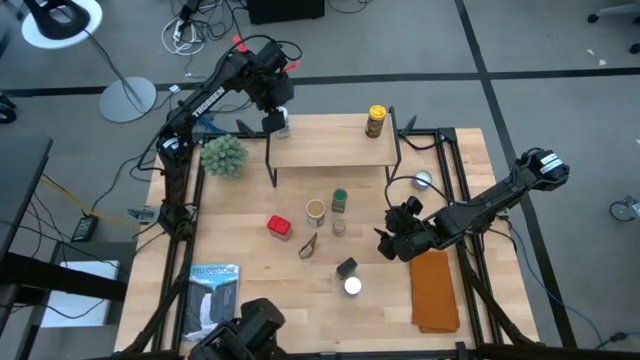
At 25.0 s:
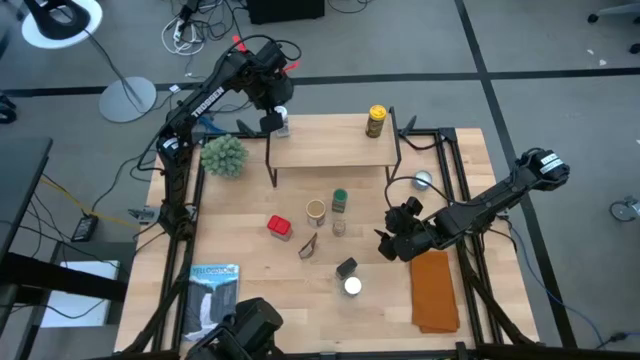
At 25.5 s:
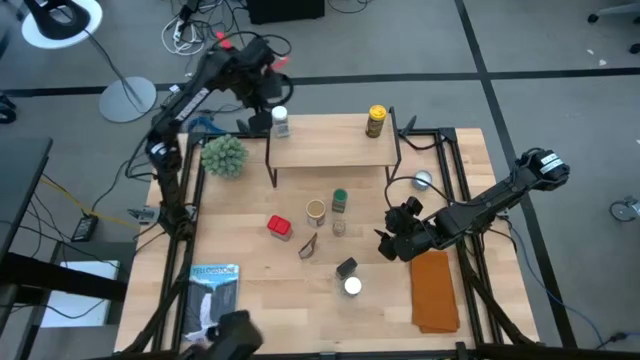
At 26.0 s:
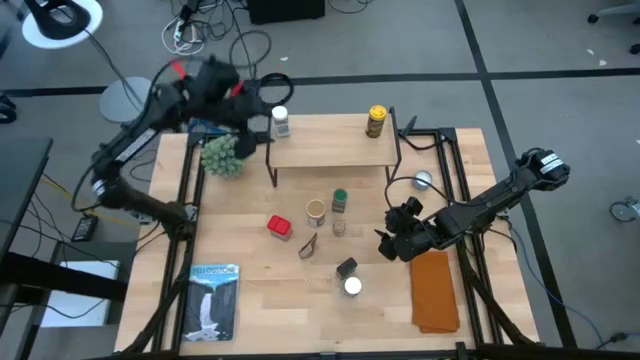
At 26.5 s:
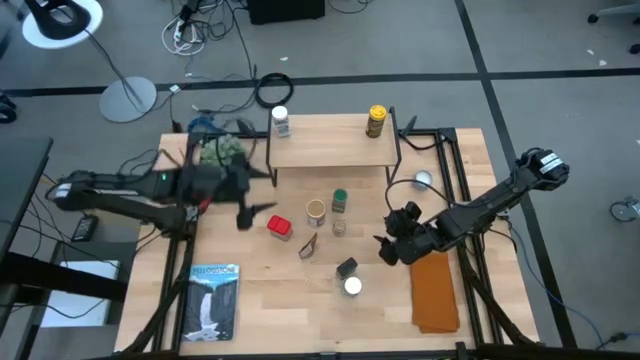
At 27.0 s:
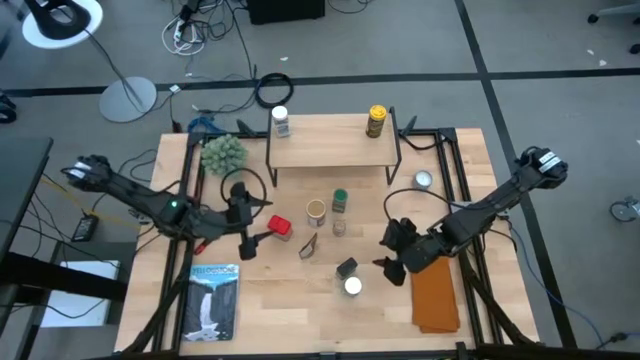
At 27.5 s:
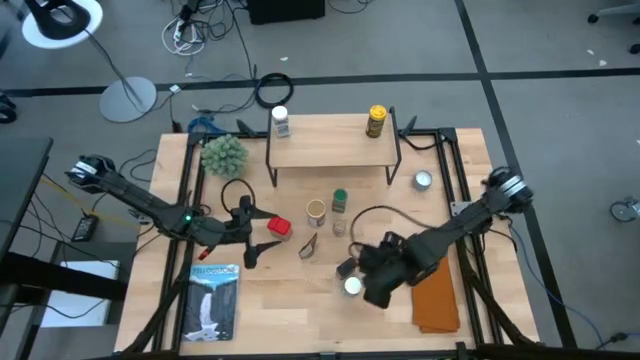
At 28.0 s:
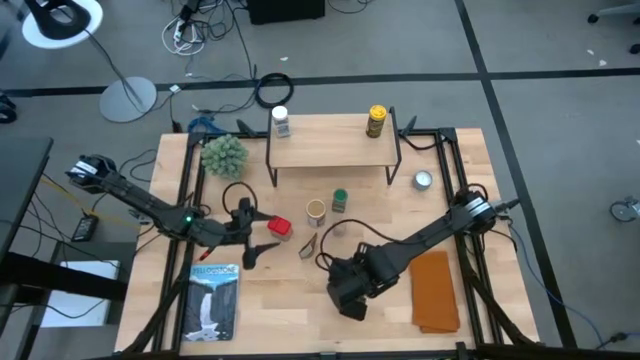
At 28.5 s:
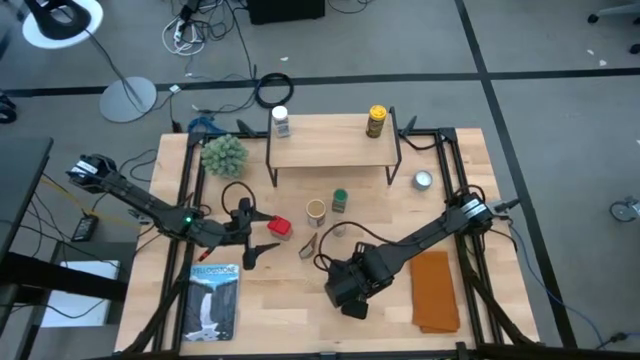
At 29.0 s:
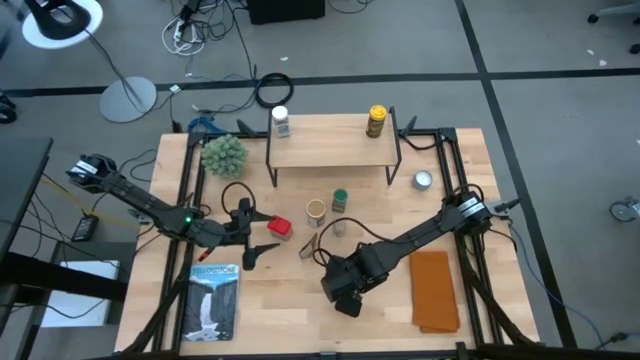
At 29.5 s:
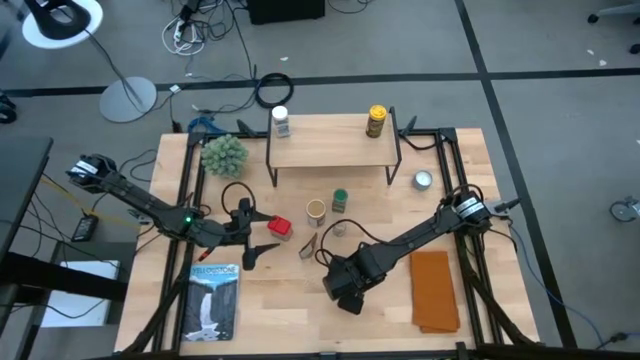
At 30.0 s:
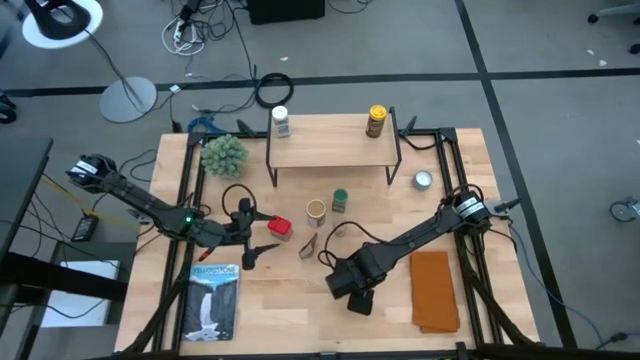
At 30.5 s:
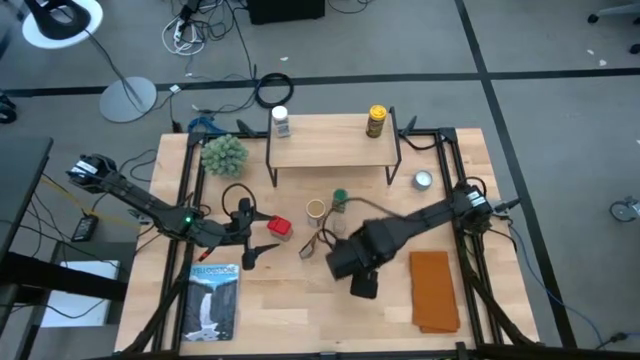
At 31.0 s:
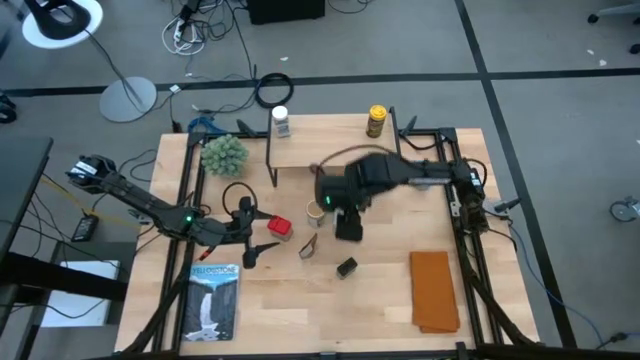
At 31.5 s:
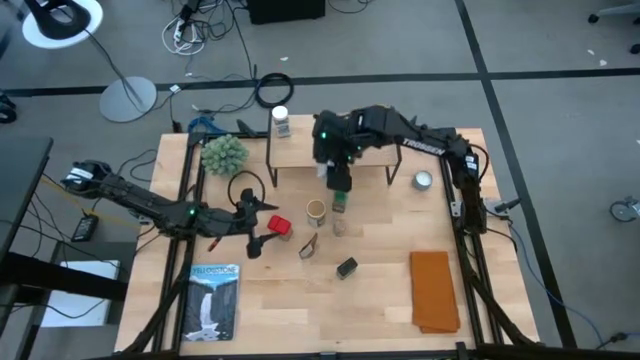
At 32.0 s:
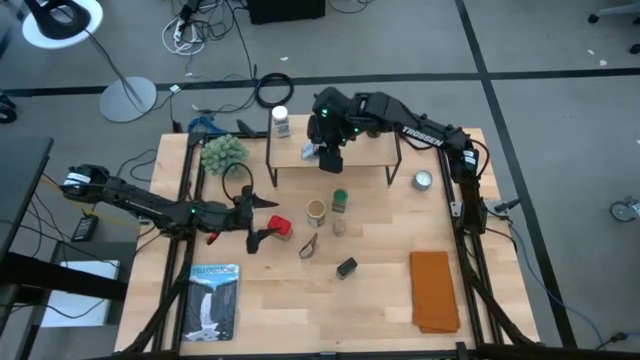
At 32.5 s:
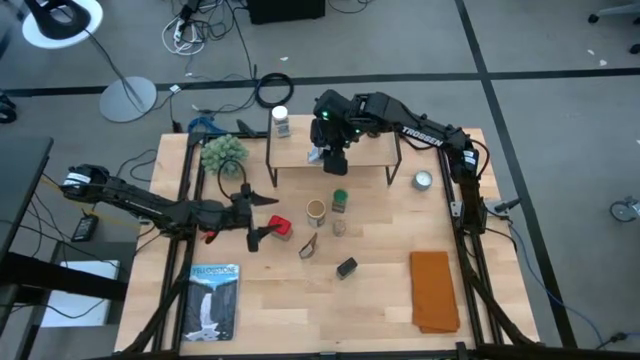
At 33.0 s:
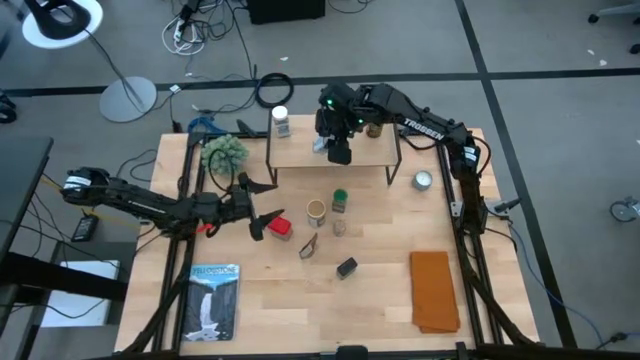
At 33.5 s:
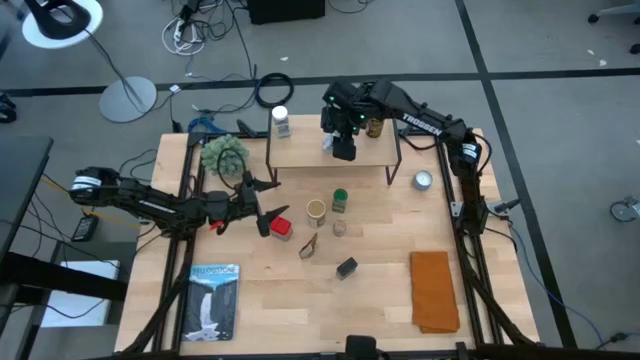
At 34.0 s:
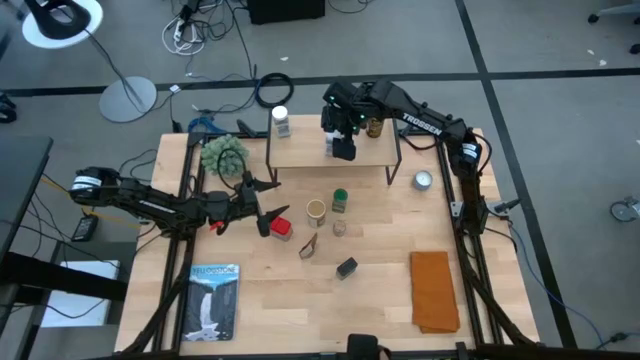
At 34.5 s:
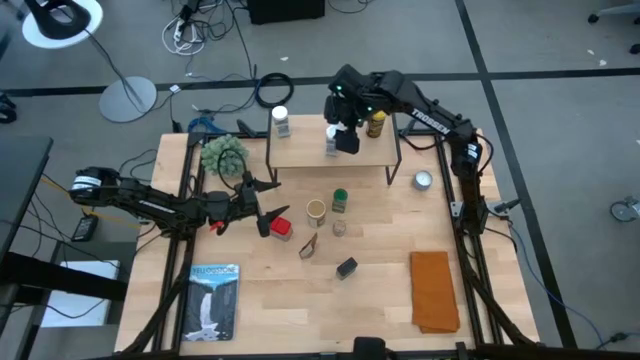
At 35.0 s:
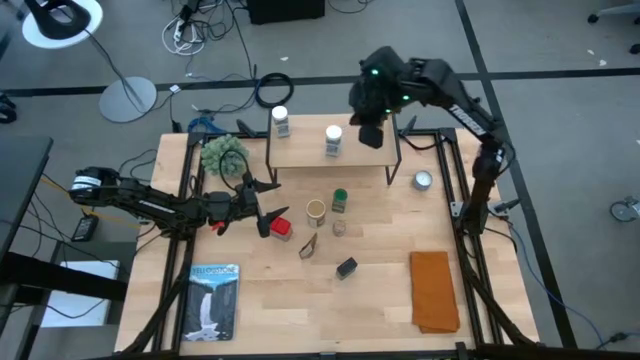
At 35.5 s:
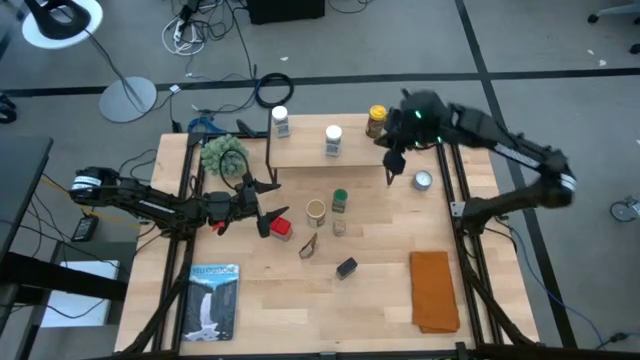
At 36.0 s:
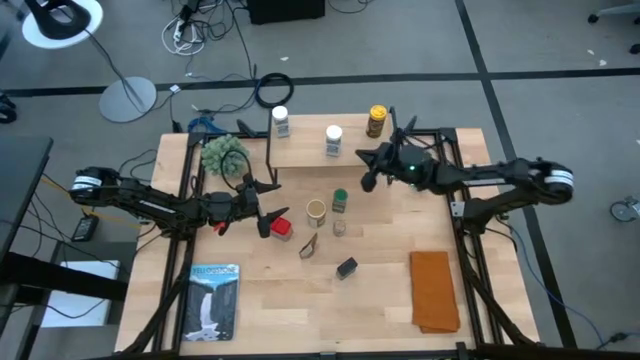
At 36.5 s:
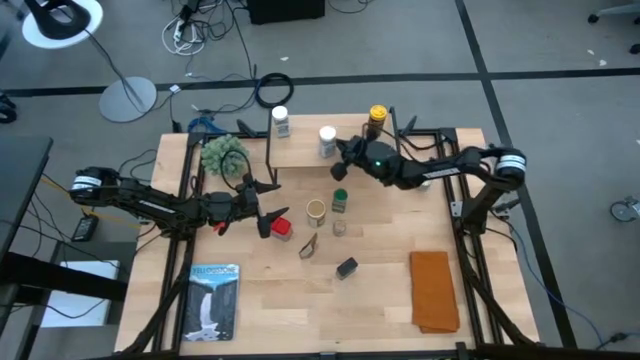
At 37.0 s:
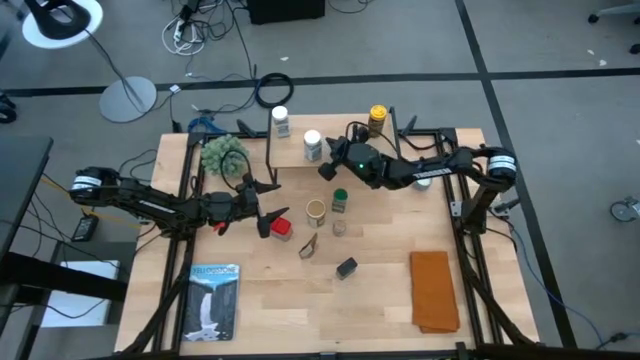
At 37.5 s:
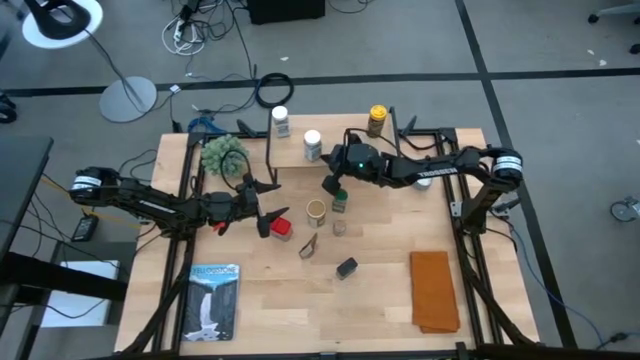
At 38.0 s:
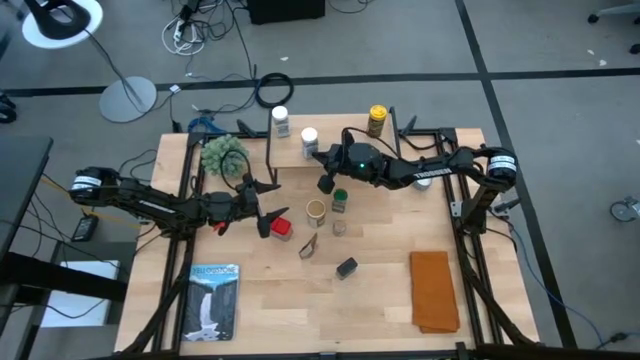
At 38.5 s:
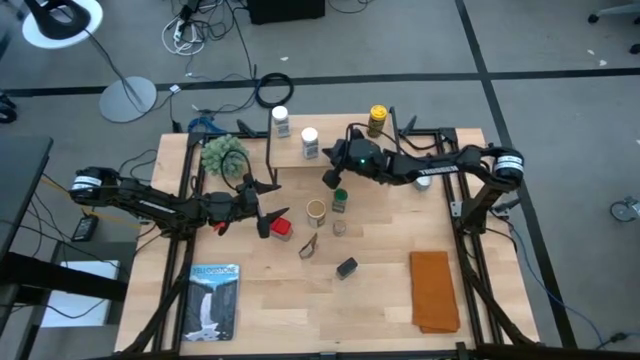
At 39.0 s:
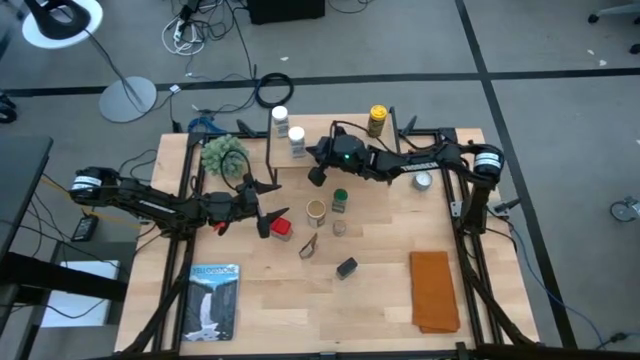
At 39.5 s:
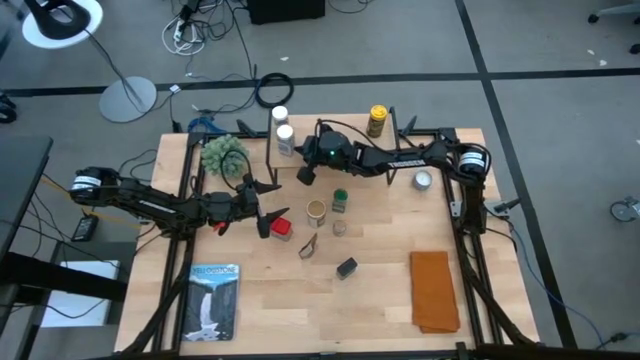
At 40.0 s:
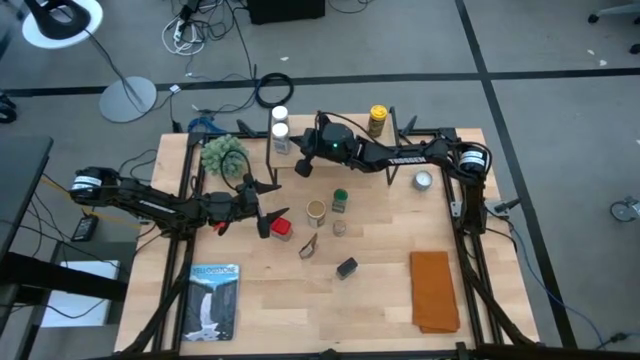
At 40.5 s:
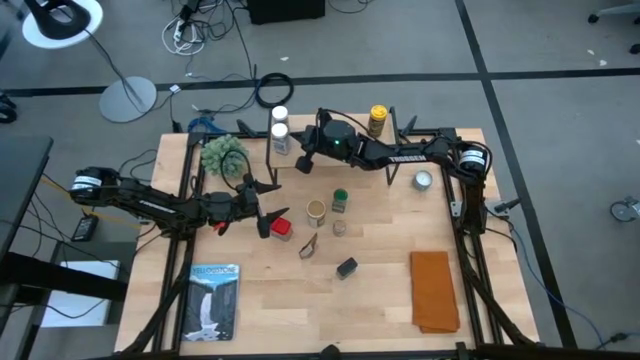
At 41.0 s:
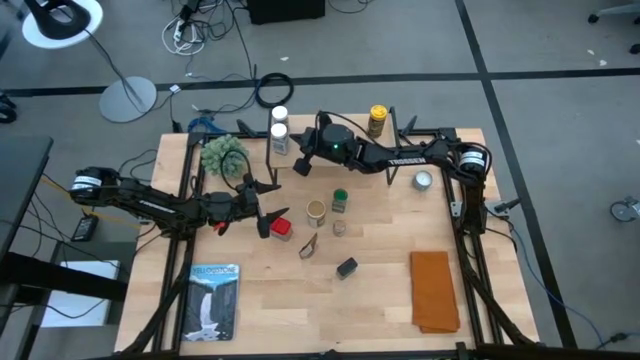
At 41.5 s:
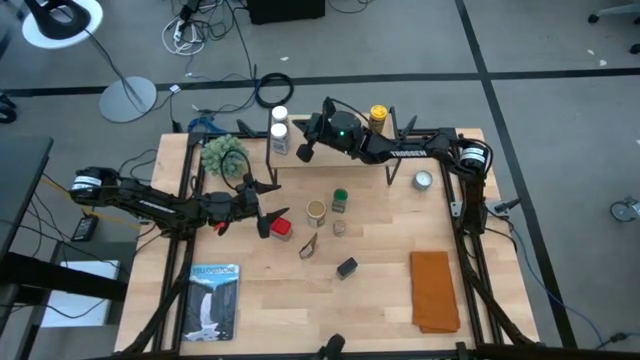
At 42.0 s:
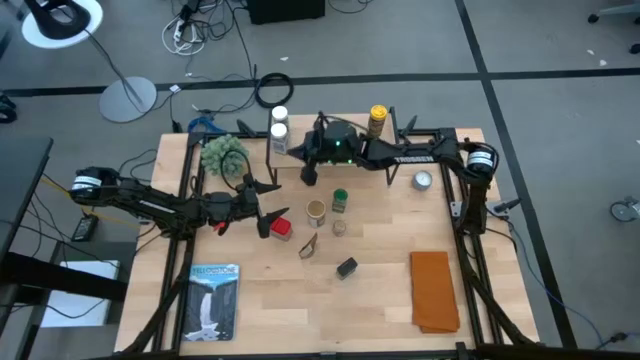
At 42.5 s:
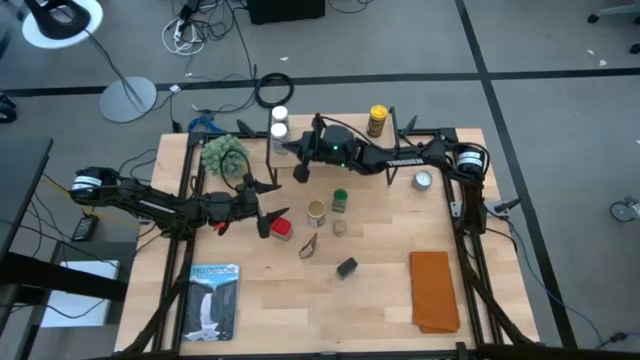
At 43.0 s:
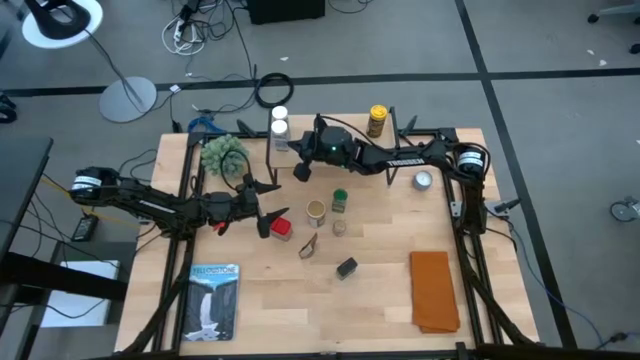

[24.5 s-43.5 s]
Task: Shelf spices
Put the white seasoning bottle on the shelf

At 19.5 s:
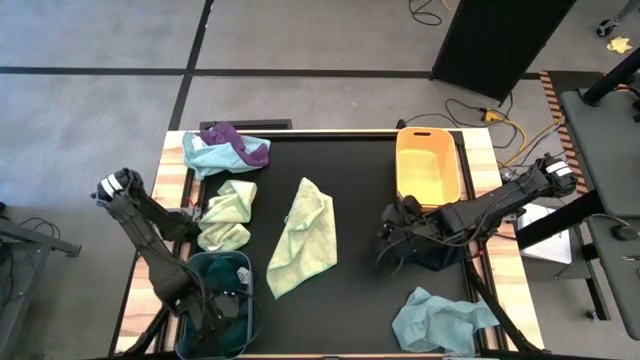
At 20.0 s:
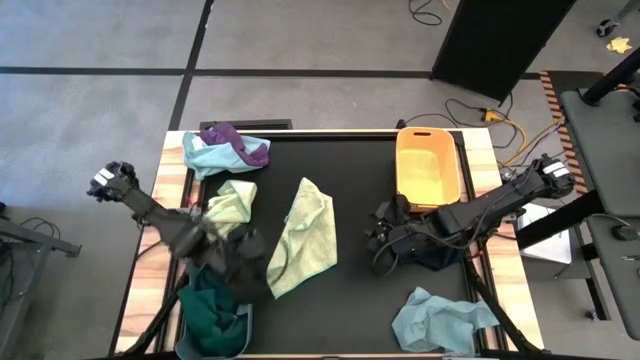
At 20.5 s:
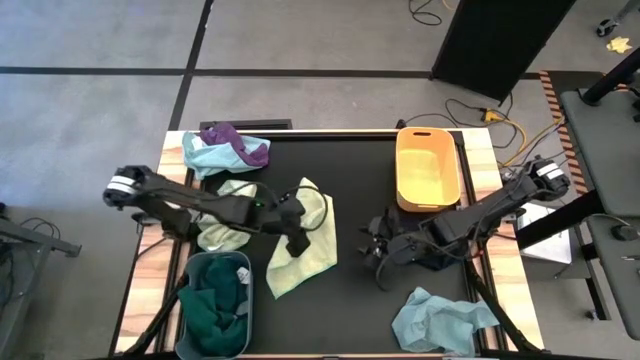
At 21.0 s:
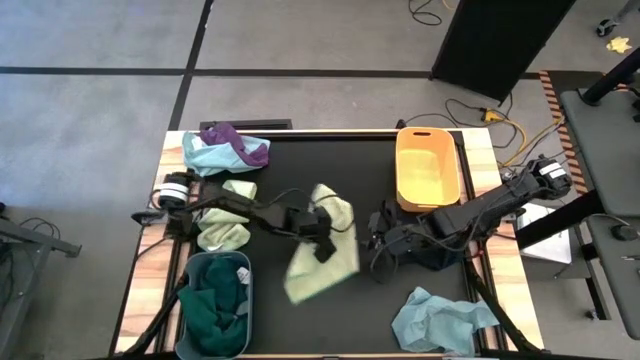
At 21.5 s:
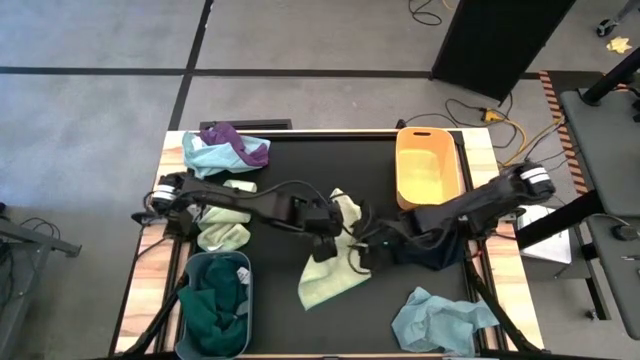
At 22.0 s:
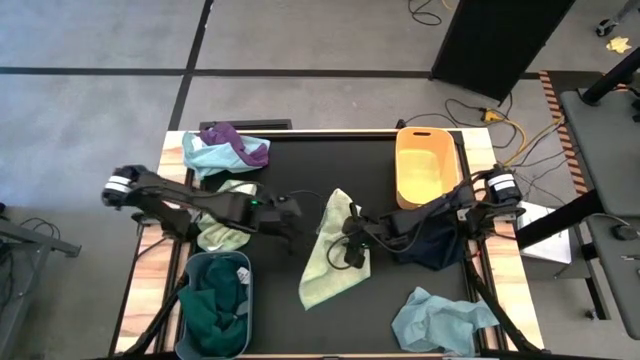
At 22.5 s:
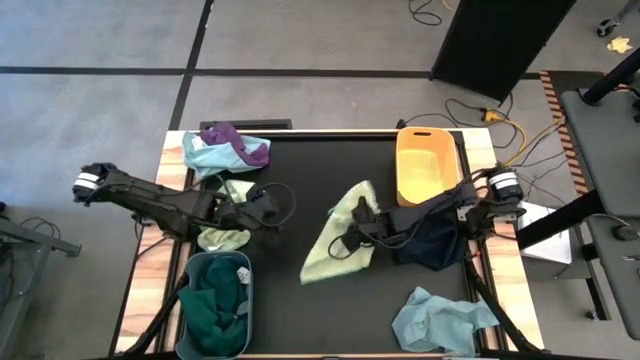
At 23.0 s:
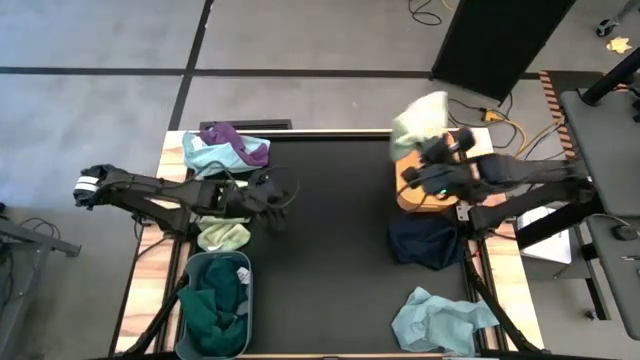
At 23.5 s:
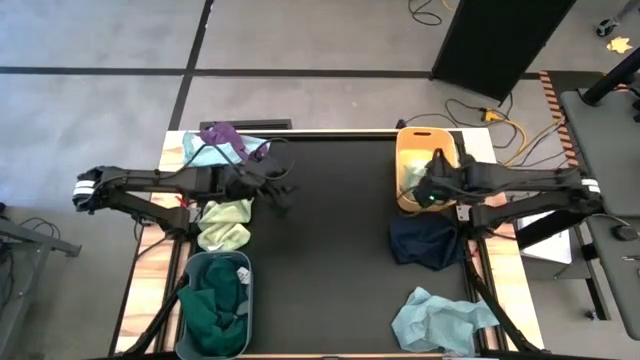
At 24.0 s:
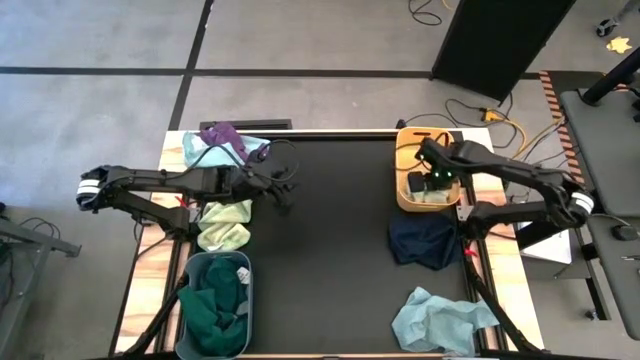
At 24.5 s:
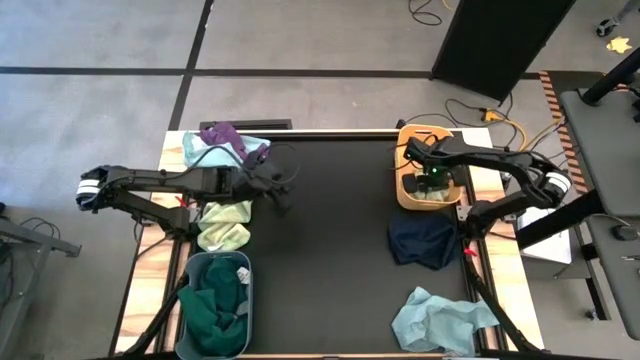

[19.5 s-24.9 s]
Task: Sort microfiber towel by color & place in baskets
Put the right light green microfiber towel into the yellow bin
